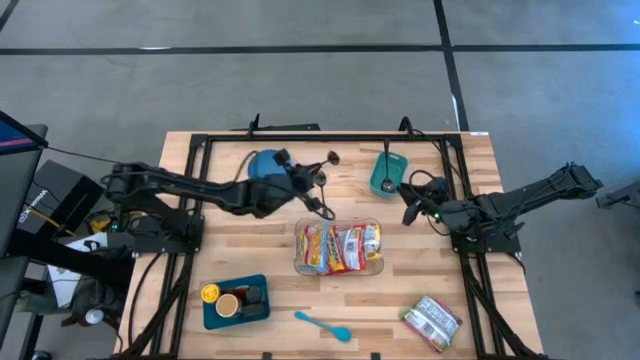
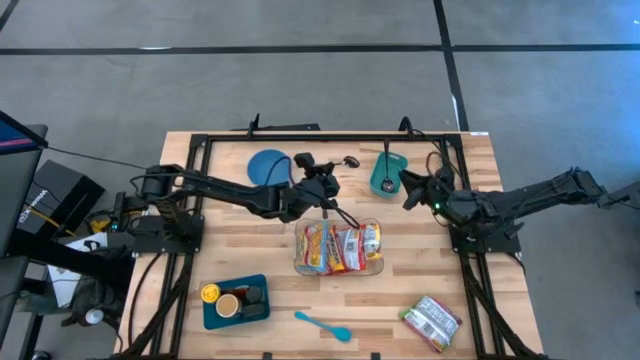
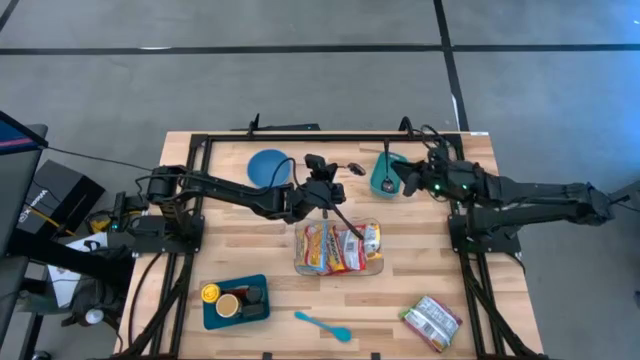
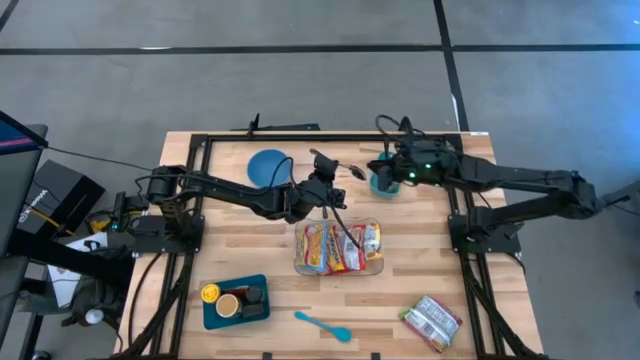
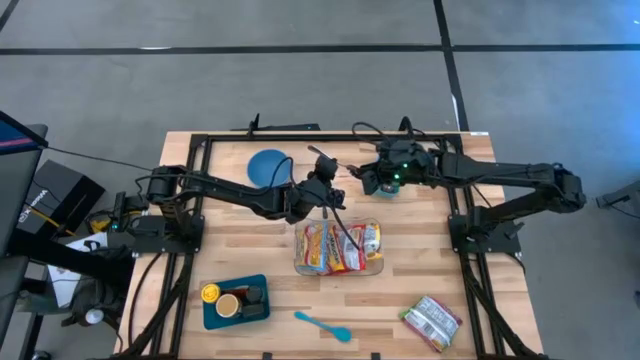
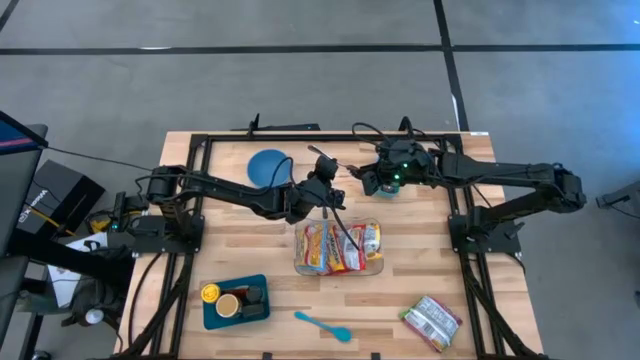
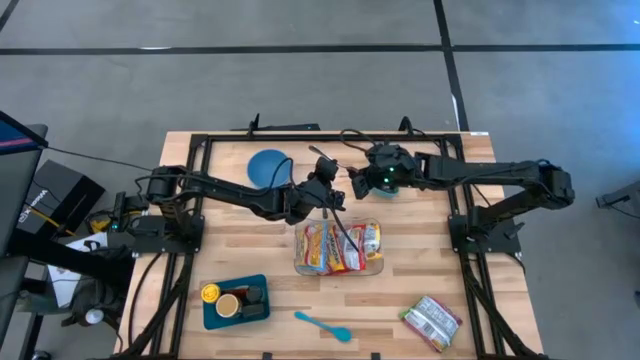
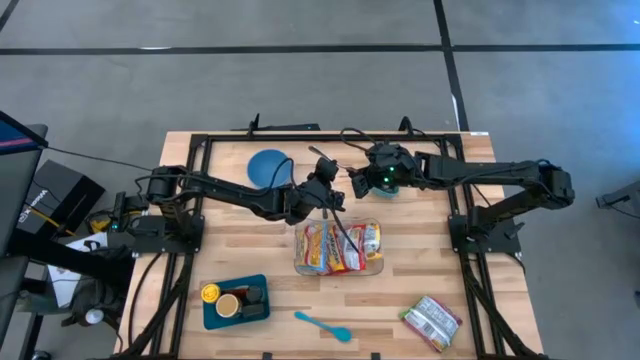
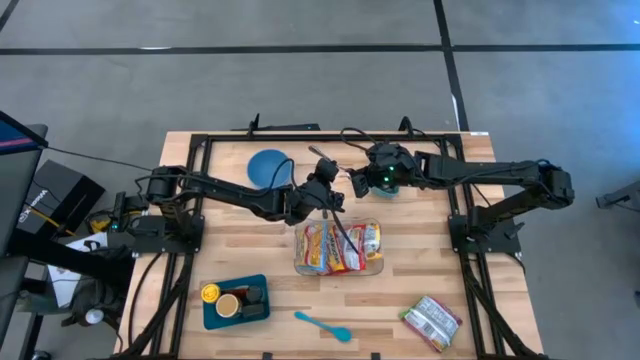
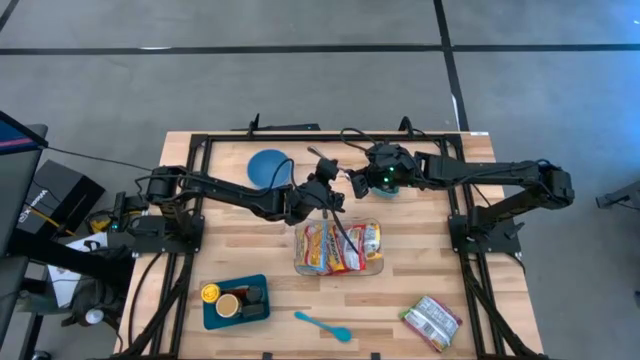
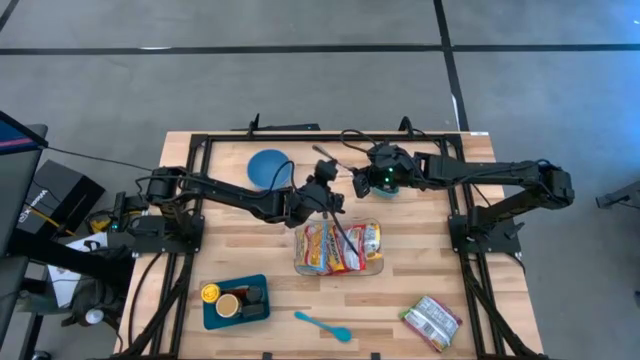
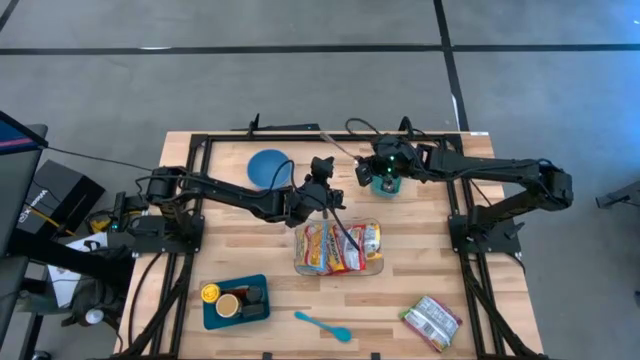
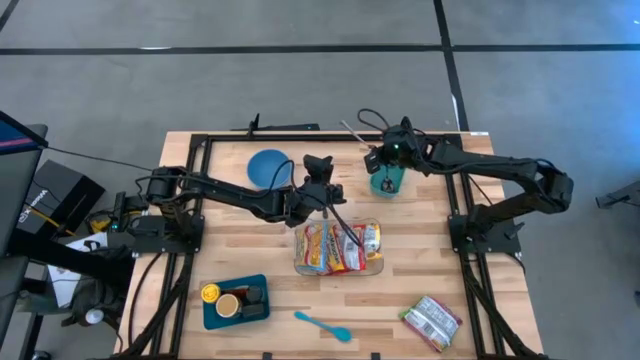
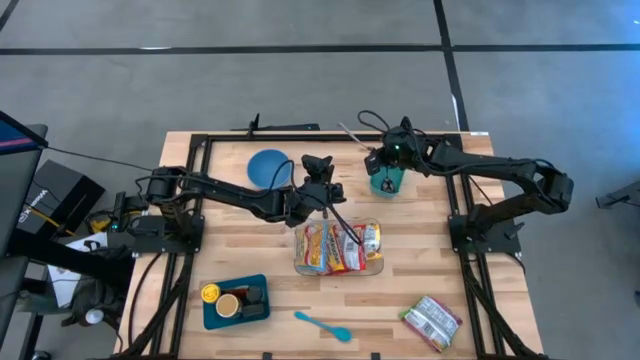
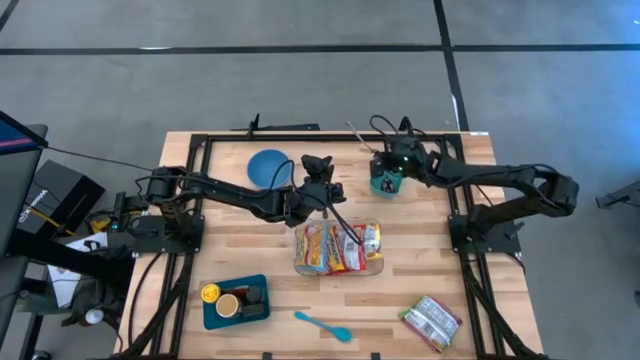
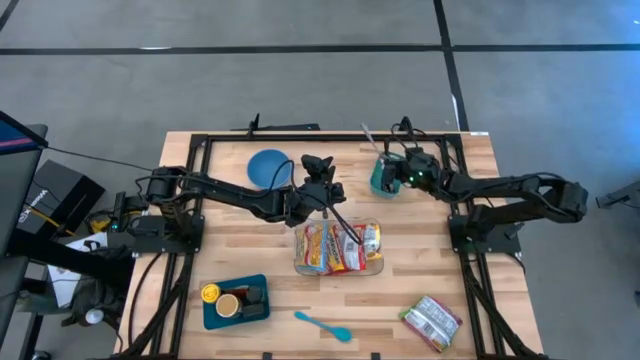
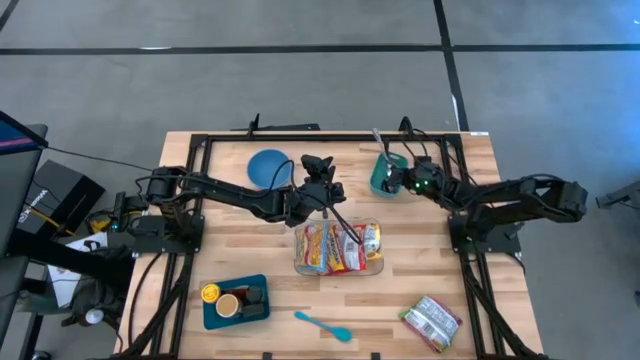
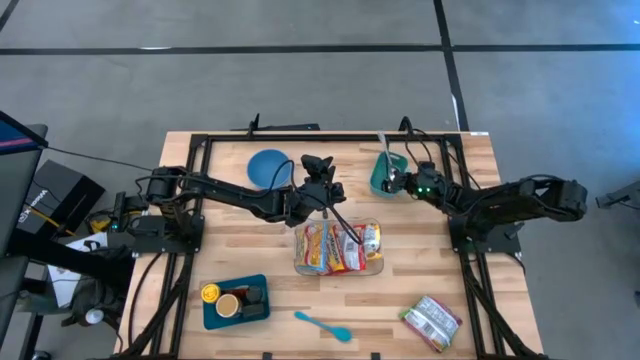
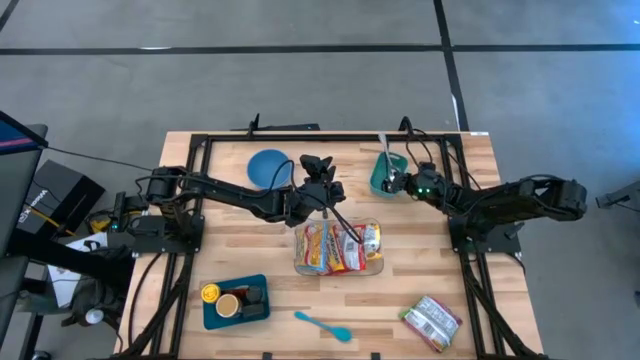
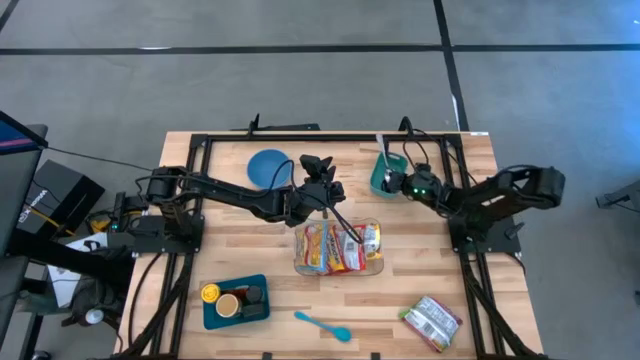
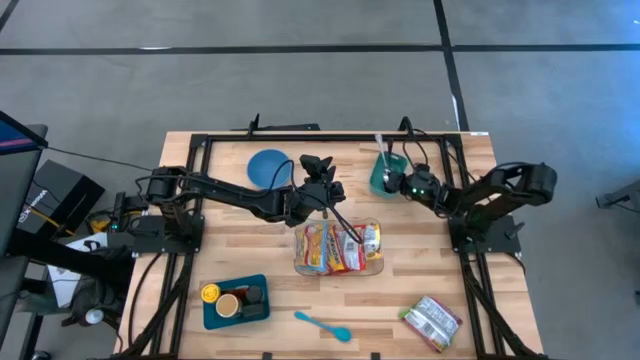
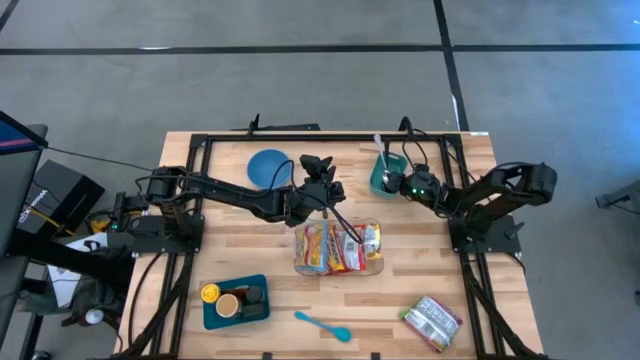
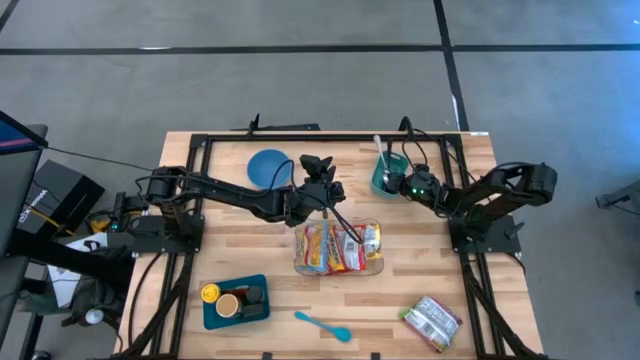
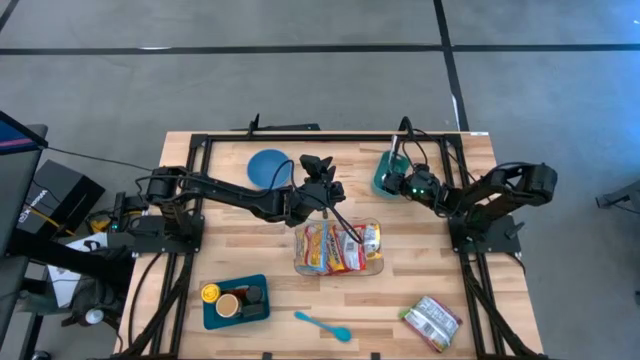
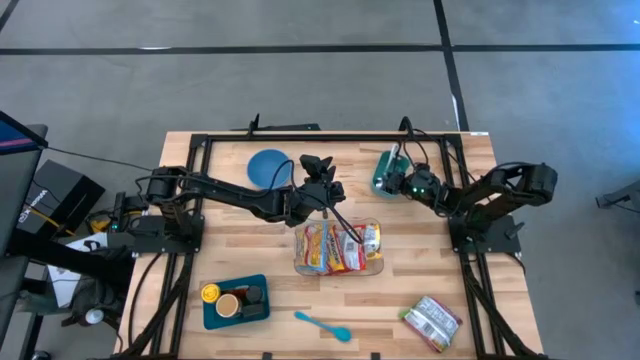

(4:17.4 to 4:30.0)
Task: Pick & Place Food Item
Put the silver spoon into the blue bin

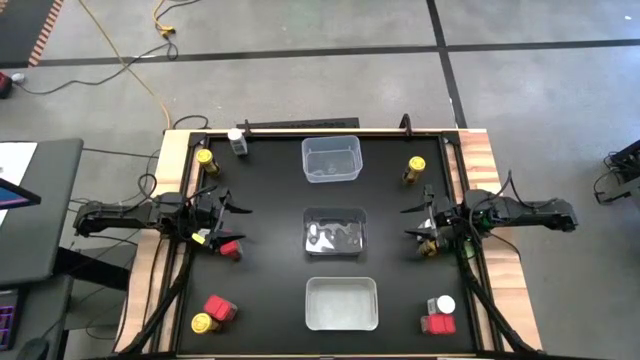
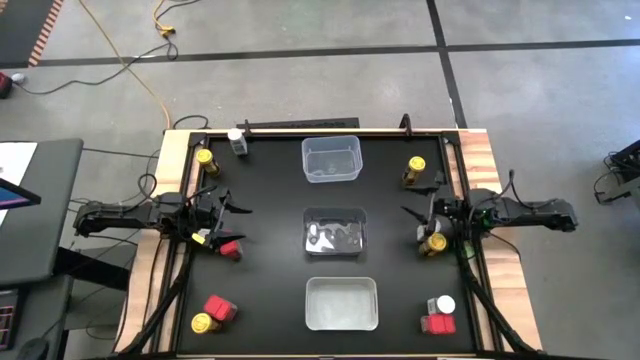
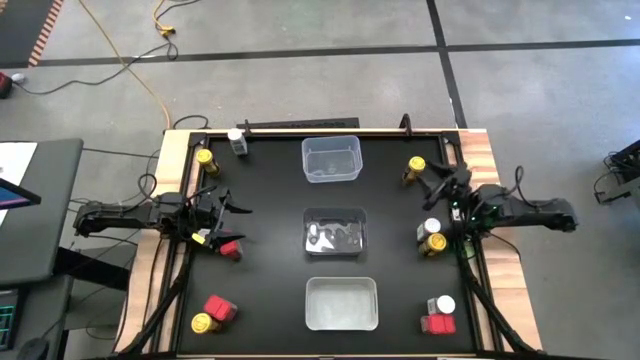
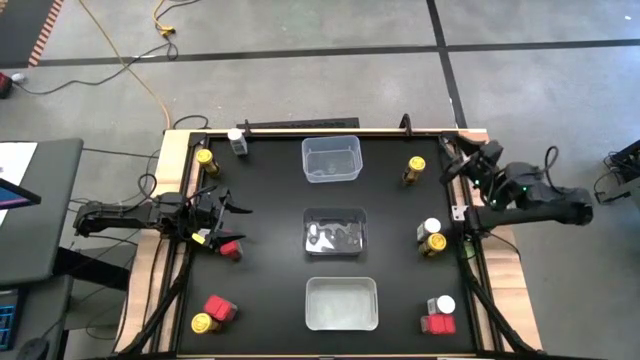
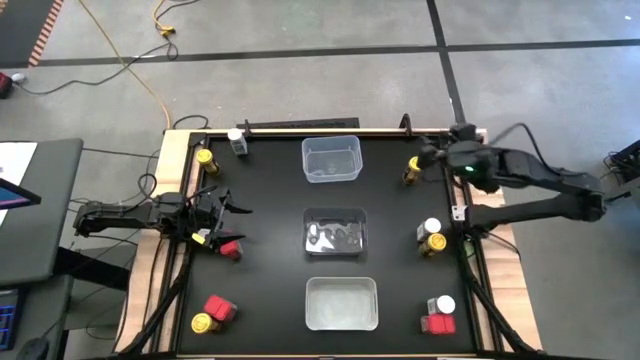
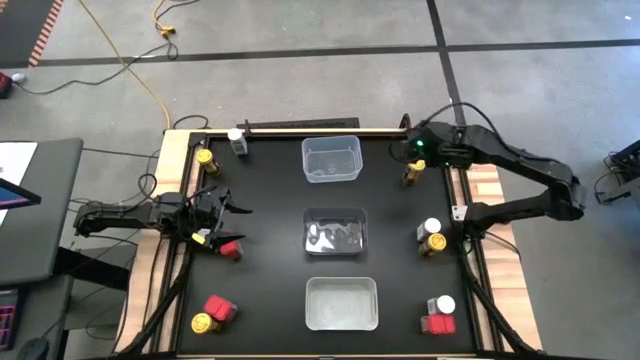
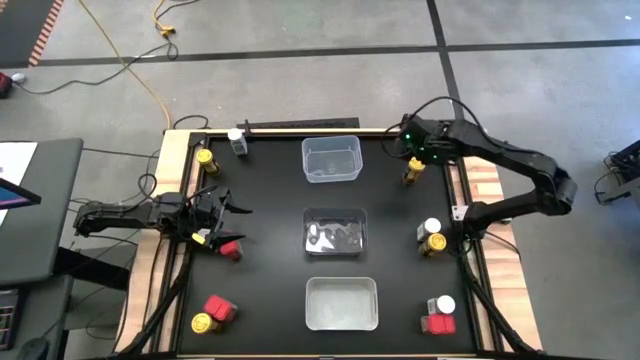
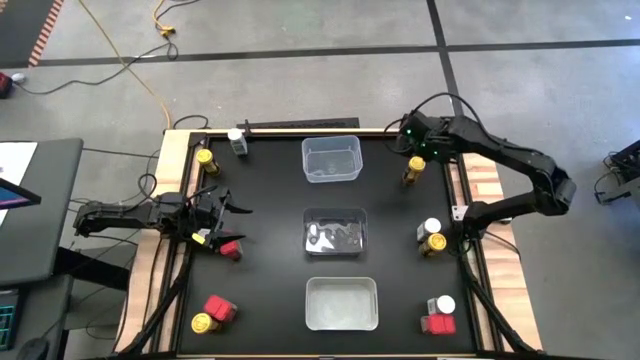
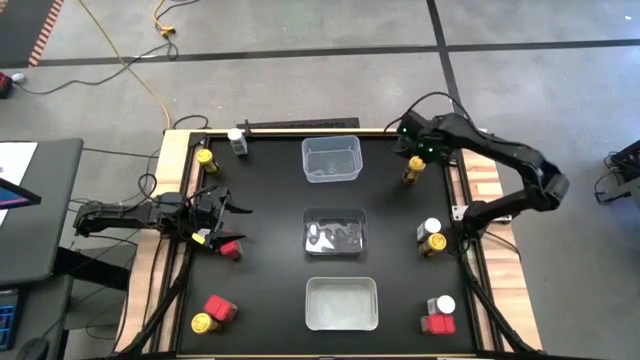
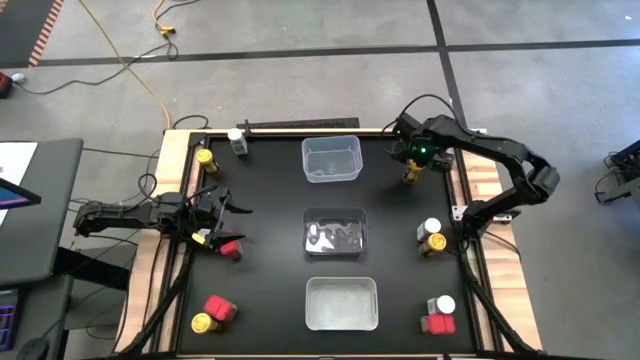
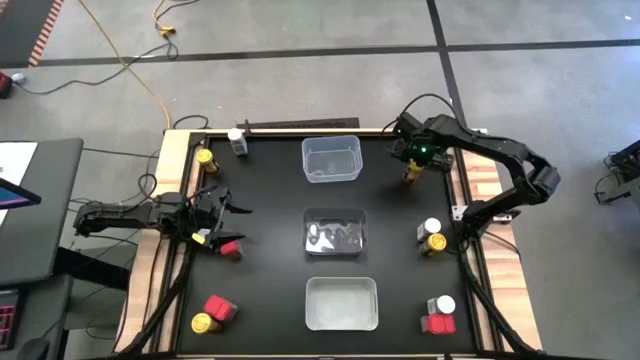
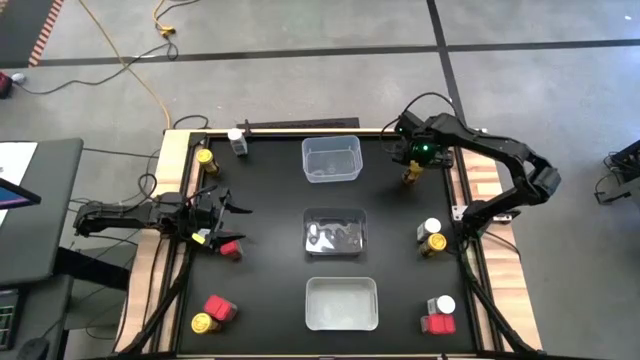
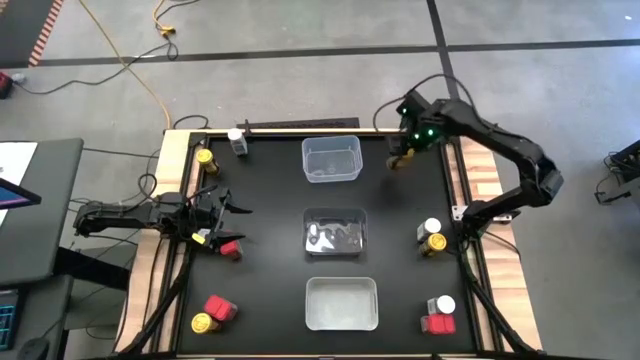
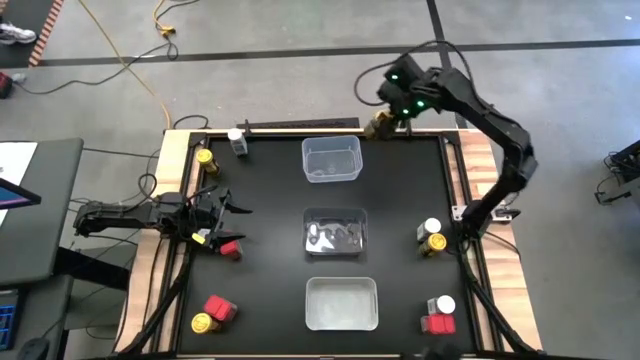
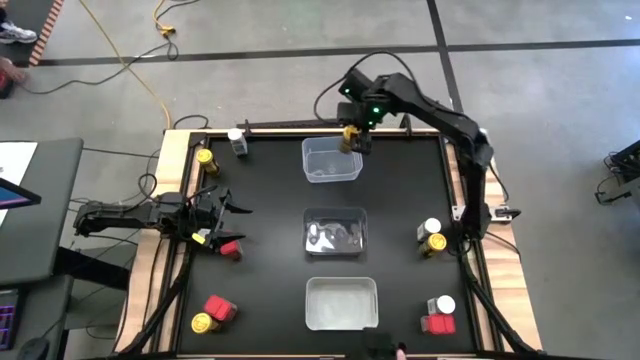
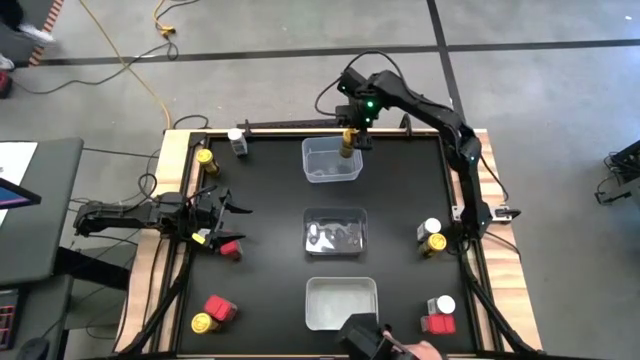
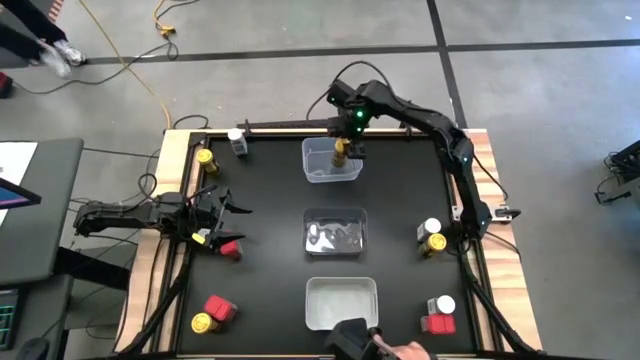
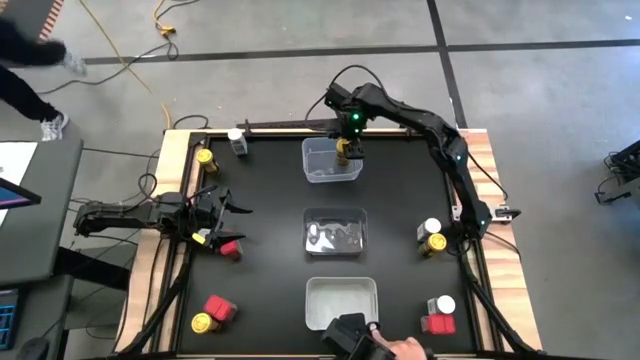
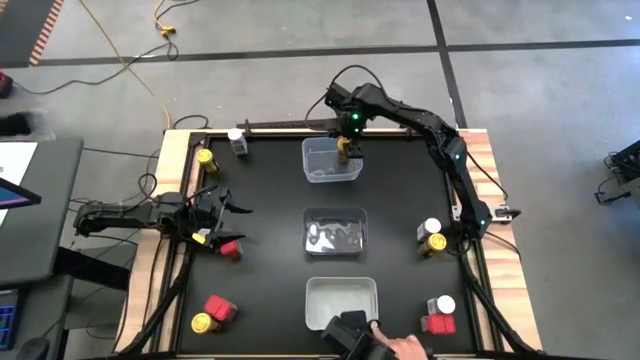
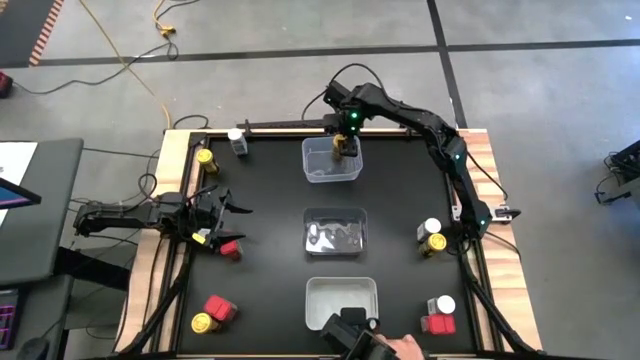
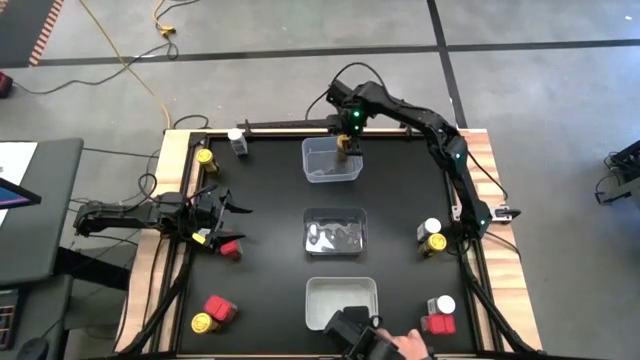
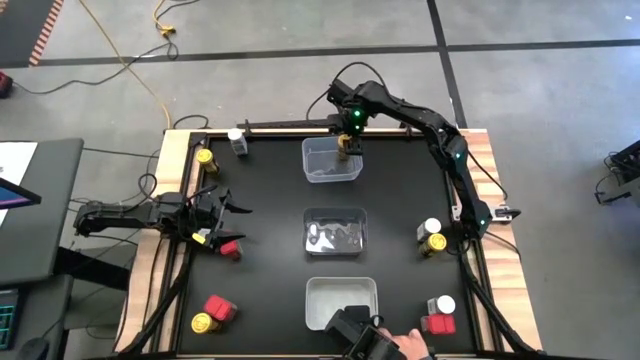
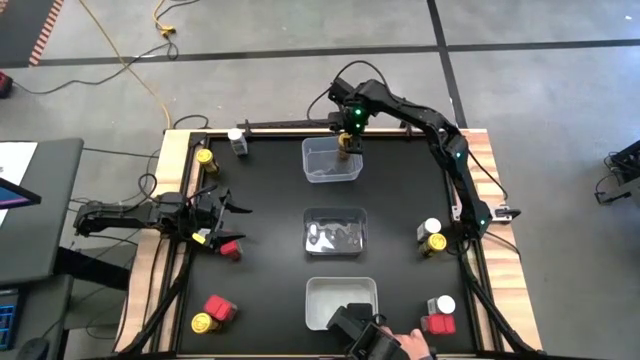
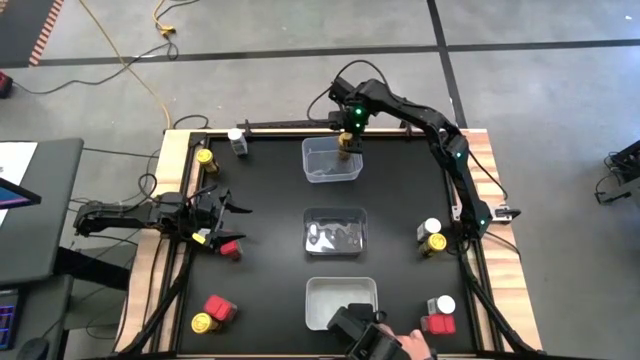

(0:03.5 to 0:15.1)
Task: Sort spices by type
Put the top right yellow seasoning bottle into the transparent bin
